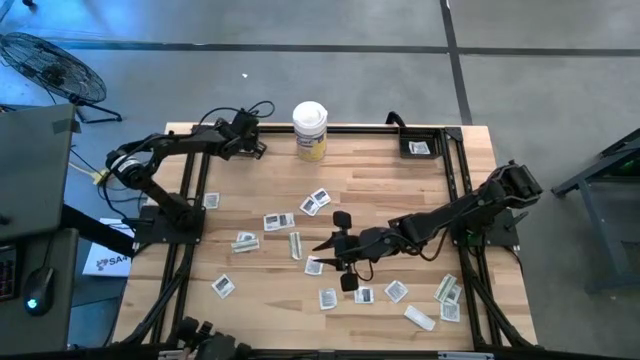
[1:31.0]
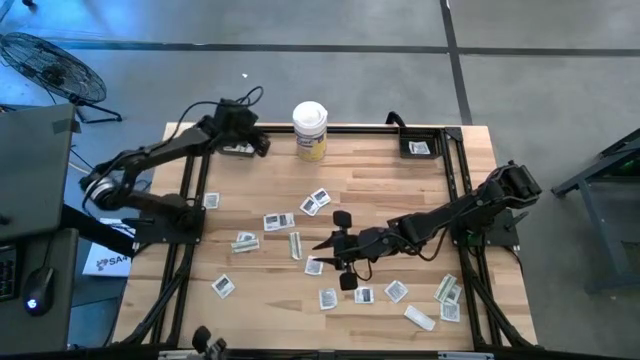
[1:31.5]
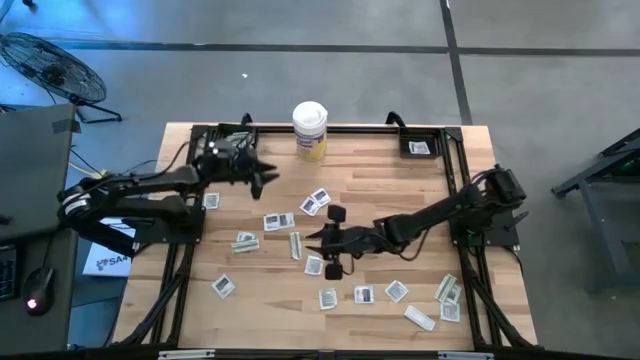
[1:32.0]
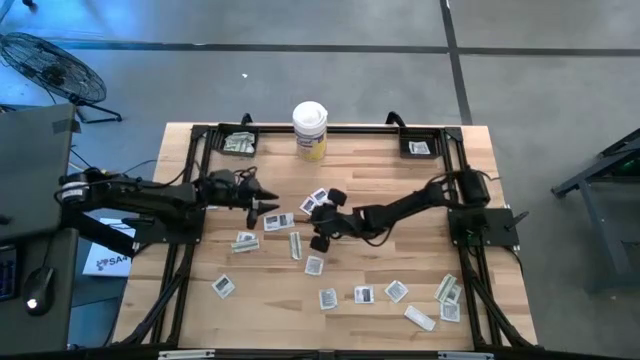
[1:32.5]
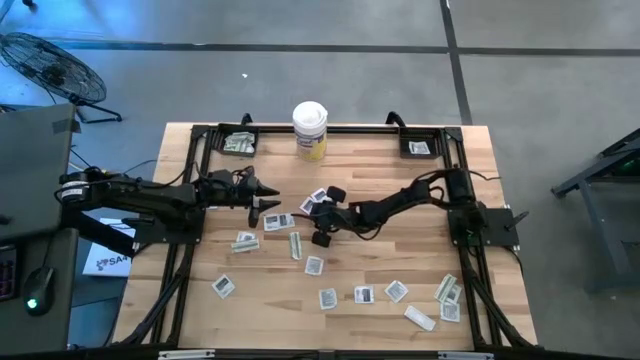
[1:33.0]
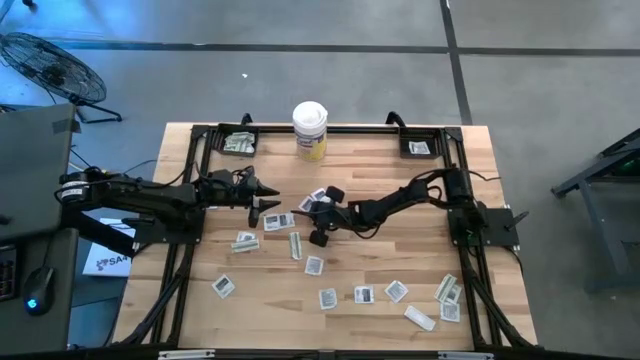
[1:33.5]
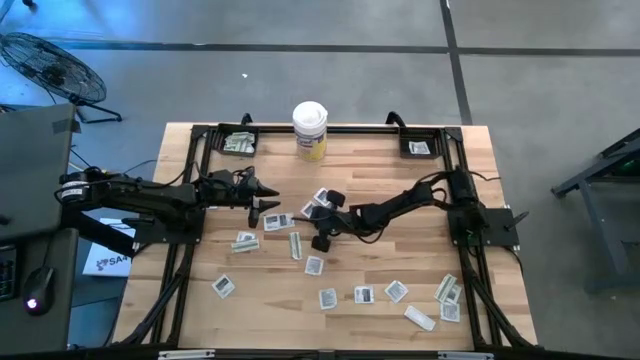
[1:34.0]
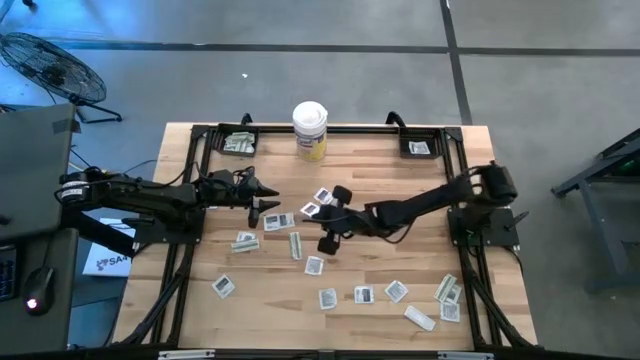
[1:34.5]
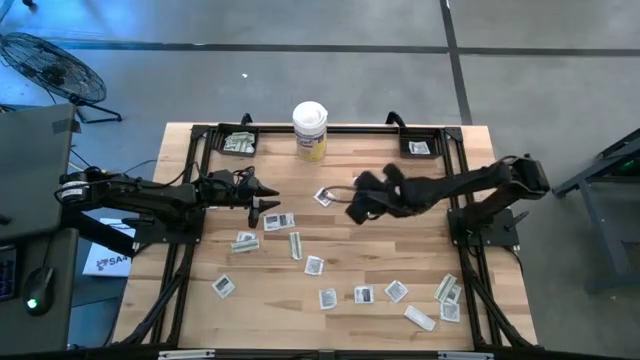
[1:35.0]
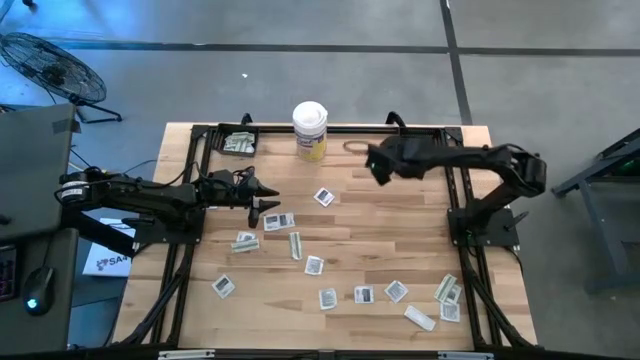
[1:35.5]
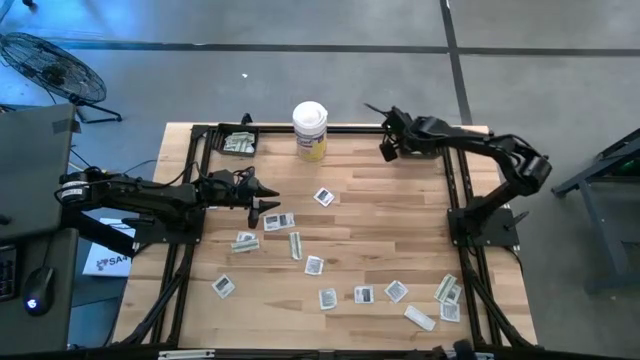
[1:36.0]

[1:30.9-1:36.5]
Task: Pick & Place First Aid Supplies
Put the black towelette pack into the right black basket

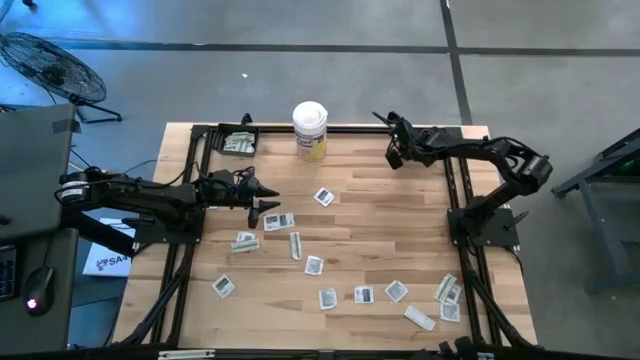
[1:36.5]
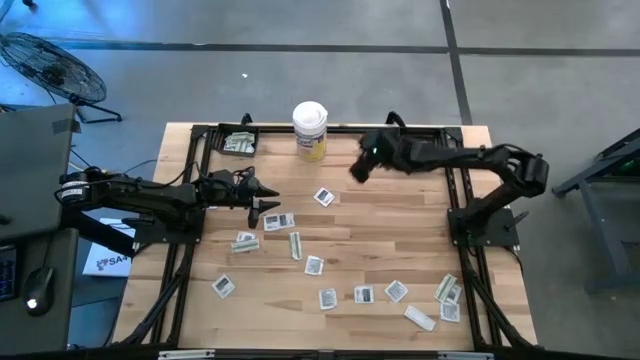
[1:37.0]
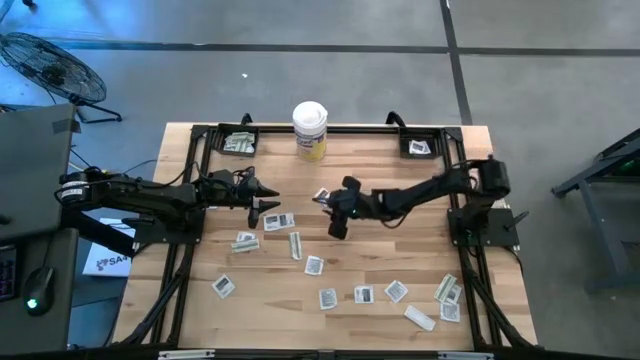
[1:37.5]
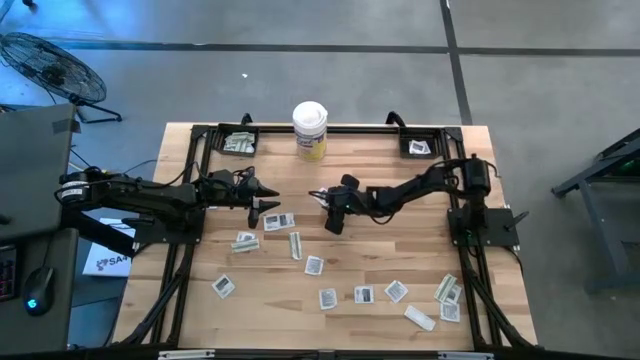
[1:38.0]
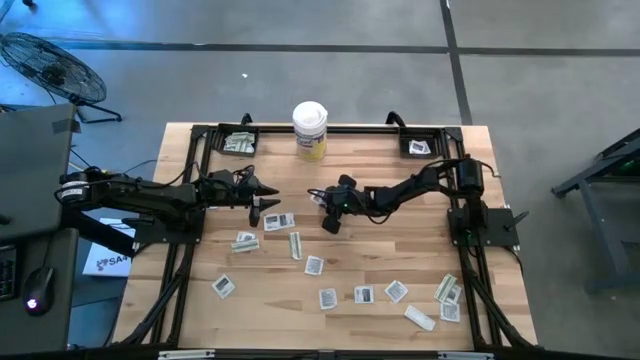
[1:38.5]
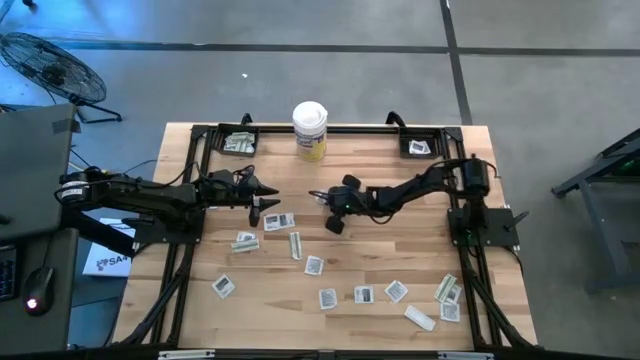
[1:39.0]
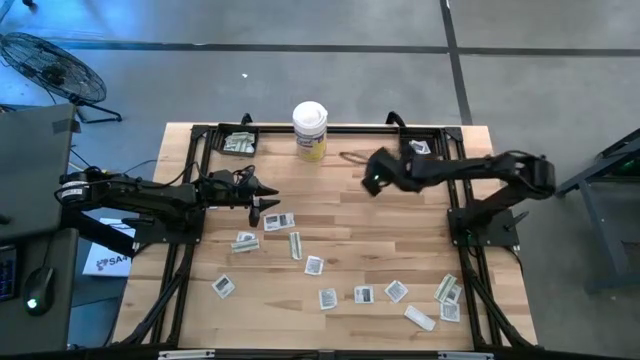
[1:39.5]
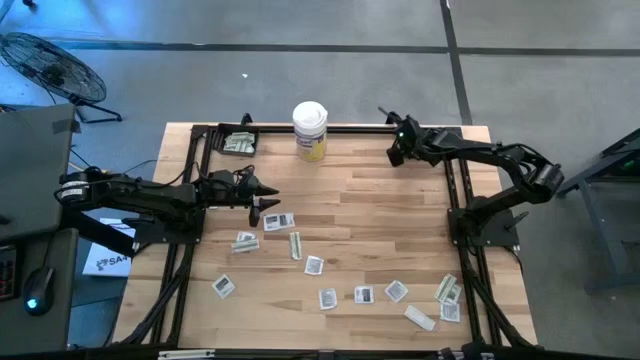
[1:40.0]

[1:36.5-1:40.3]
Put the black towelette pack into the right black basket

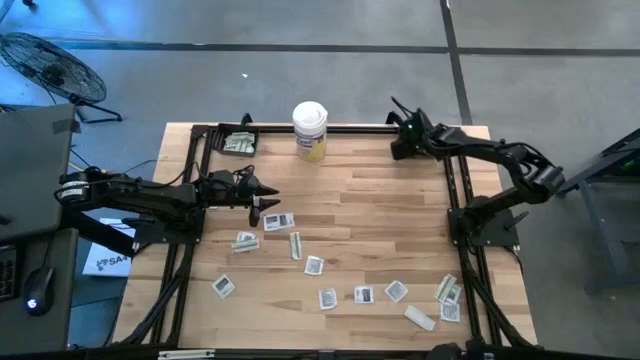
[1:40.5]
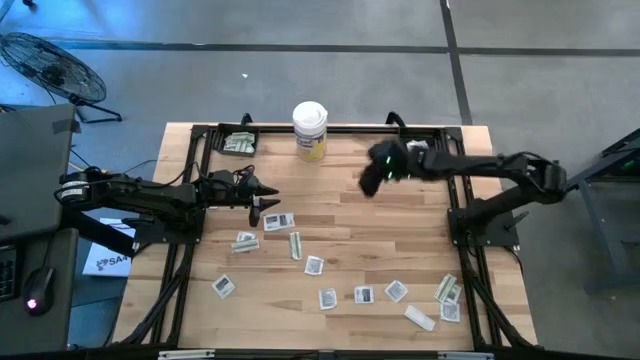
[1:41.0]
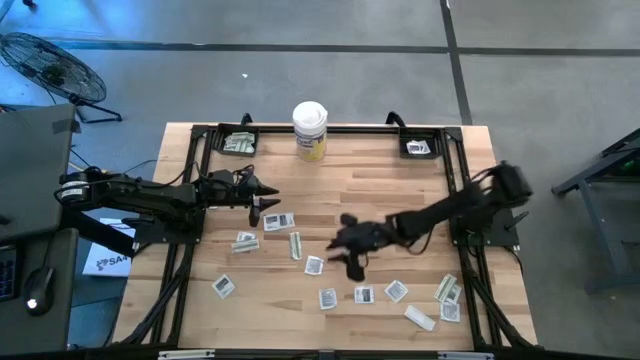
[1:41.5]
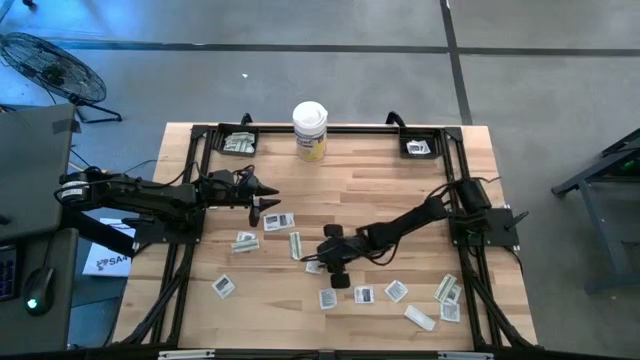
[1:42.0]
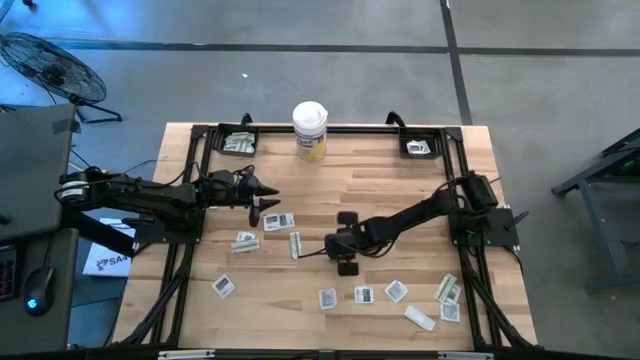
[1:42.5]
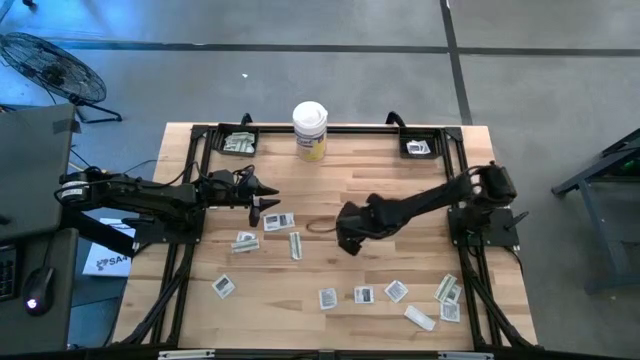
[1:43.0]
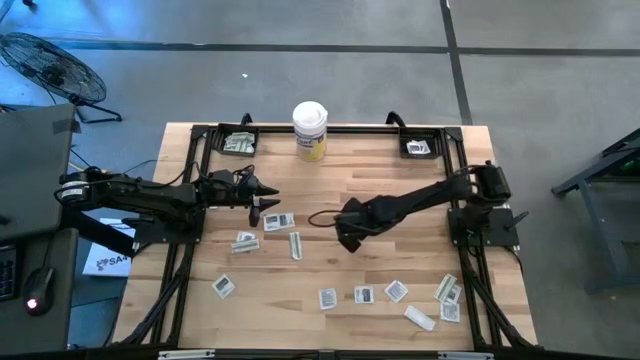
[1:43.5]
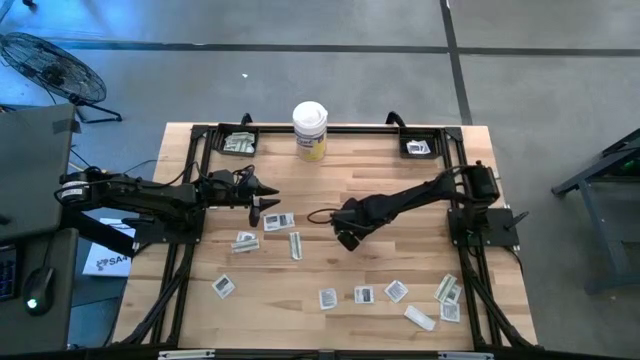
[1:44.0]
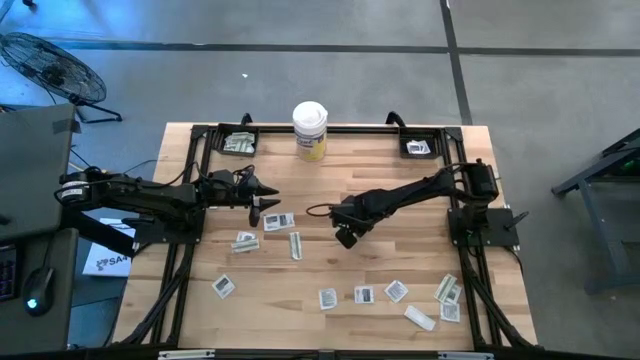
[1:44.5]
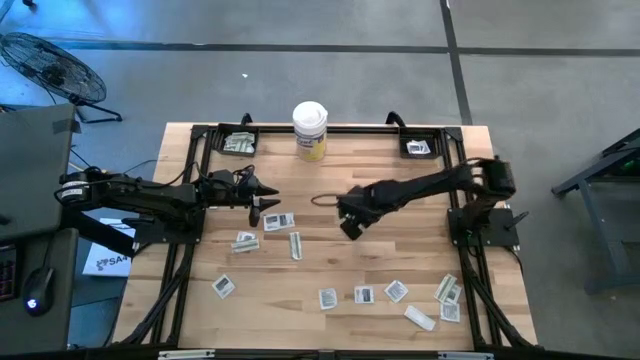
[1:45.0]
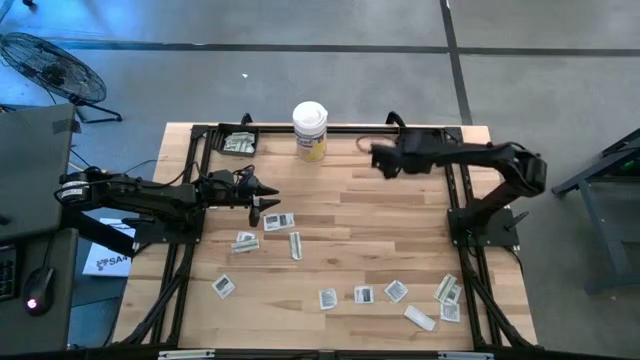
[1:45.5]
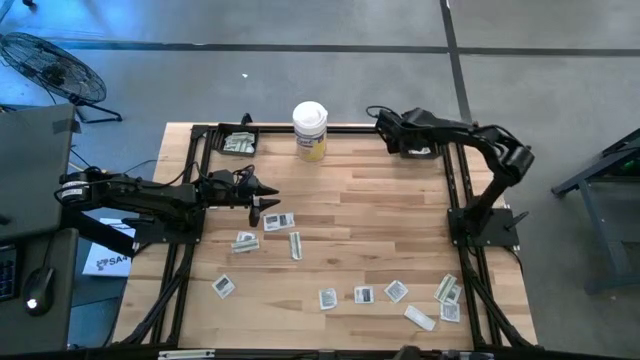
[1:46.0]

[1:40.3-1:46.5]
Put the black towelette pack into the right black basket

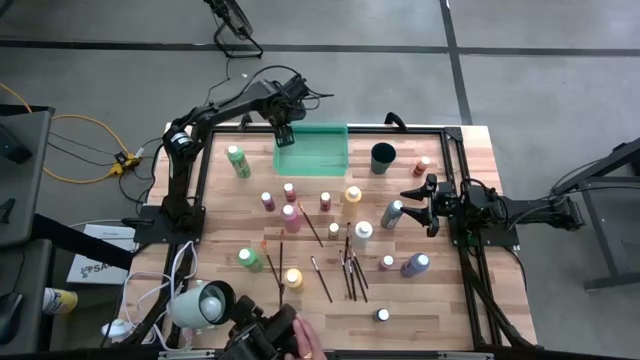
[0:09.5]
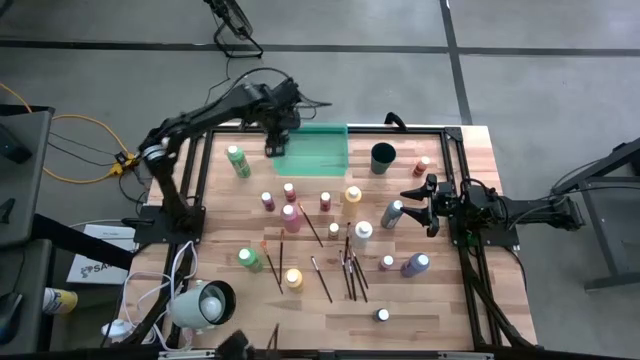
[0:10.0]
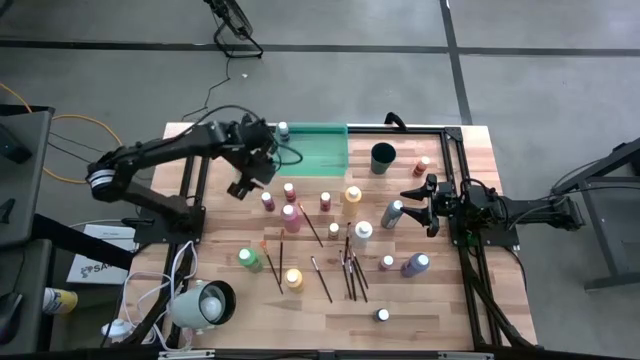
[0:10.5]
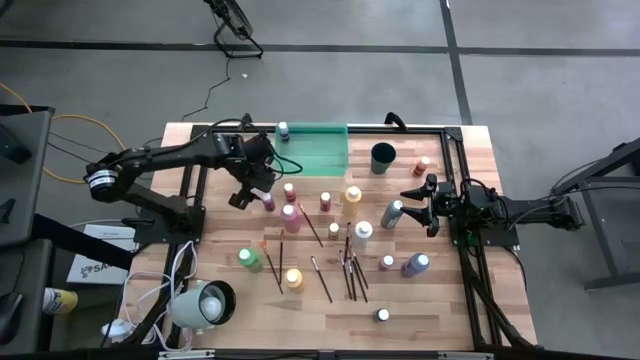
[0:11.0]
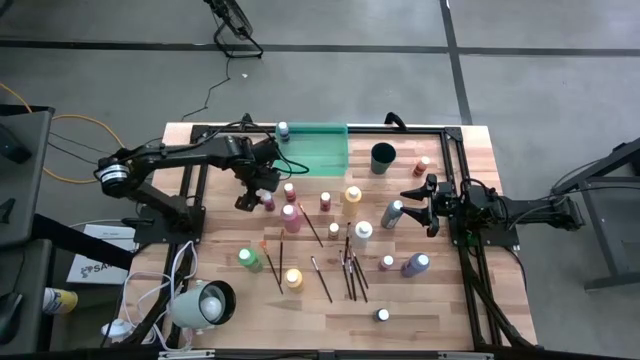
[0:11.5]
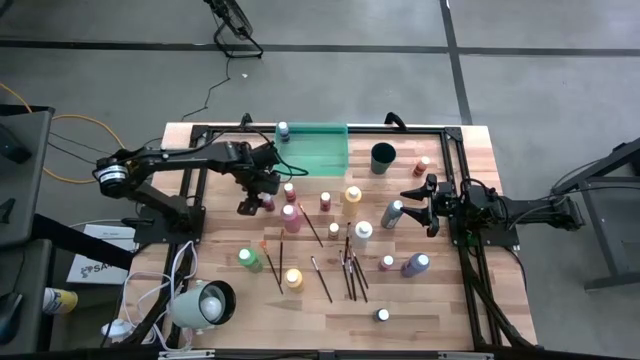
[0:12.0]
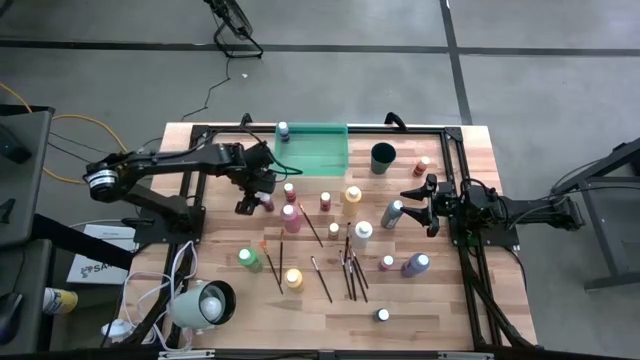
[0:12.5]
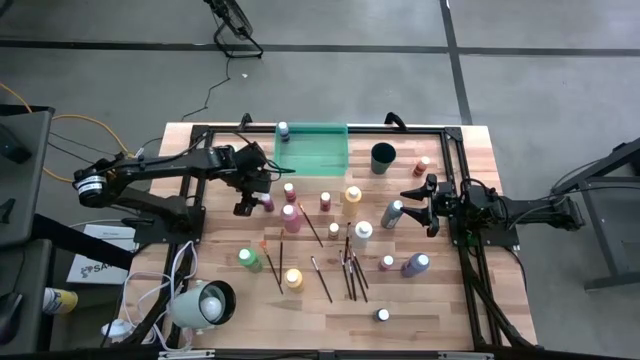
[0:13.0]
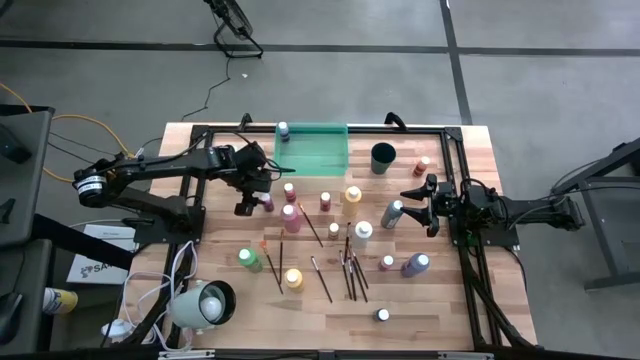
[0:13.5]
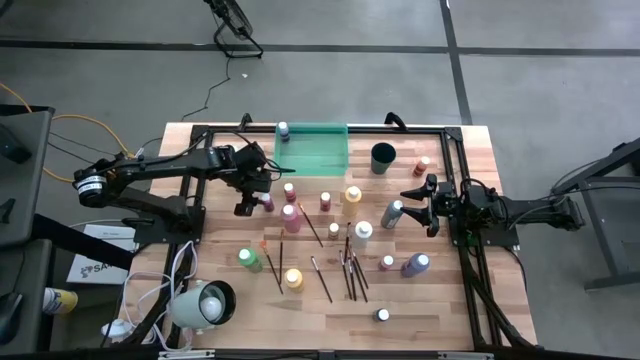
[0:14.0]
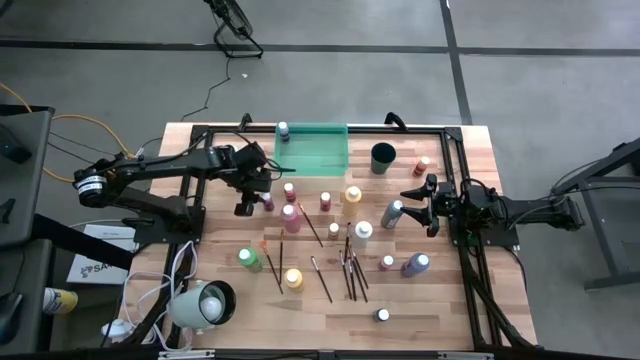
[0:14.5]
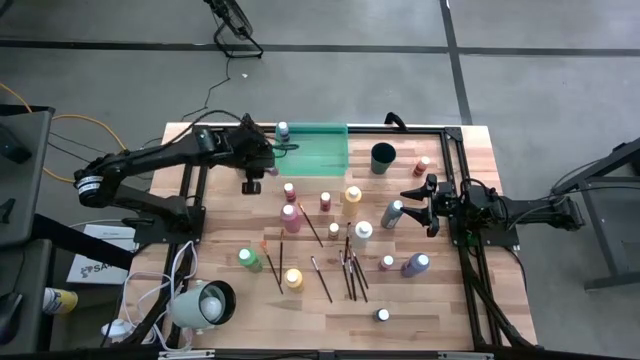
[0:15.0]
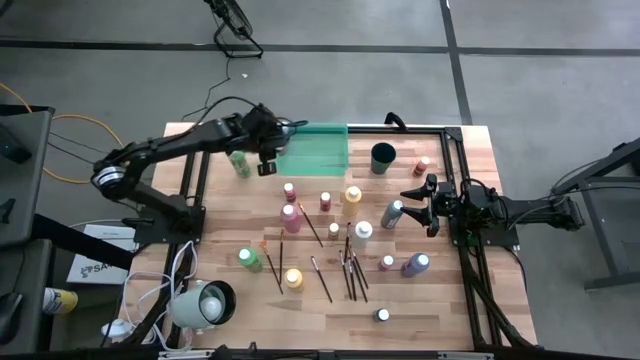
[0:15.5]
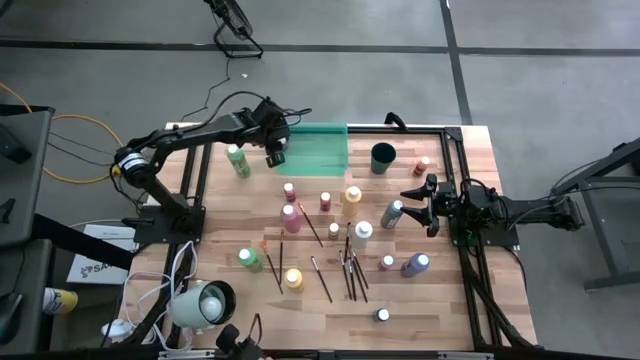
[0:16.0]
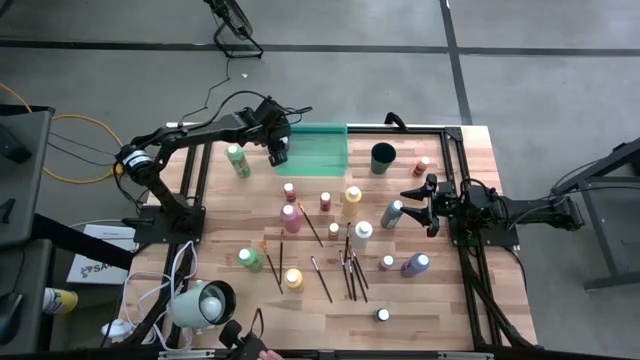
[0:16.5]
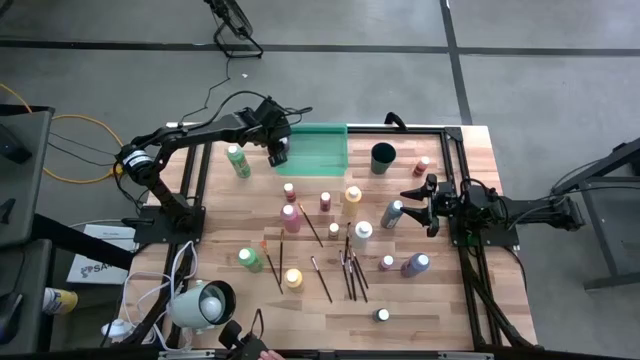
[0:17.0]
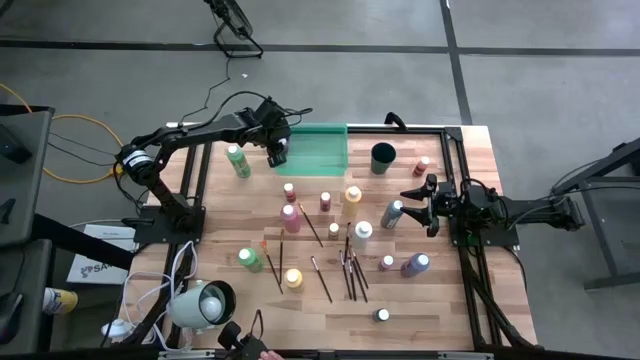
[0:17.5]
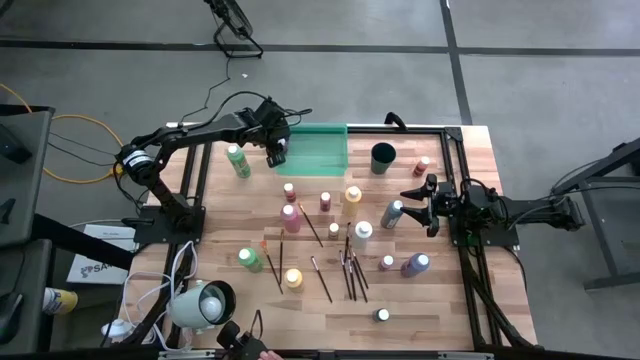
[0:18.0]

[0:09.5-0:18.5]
Task: Pick & Place Paint Supplies
Put the dark pink paint bottle into the green bin
